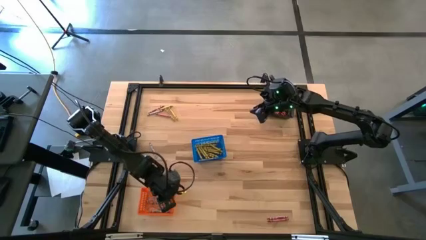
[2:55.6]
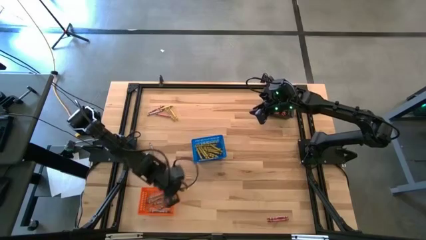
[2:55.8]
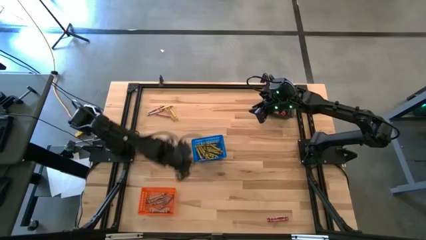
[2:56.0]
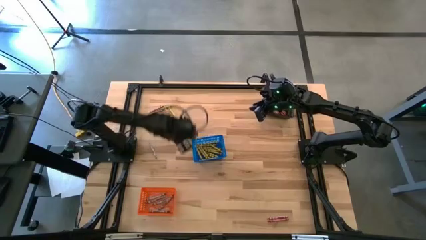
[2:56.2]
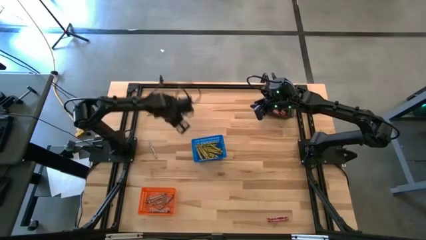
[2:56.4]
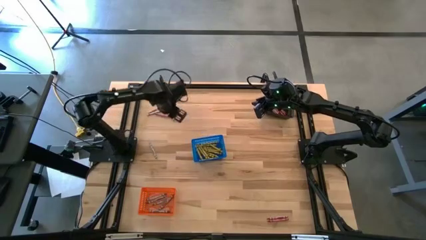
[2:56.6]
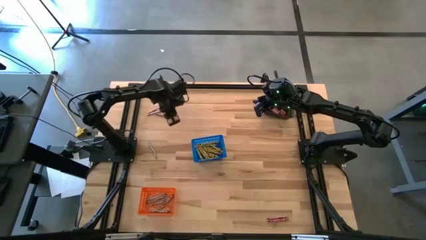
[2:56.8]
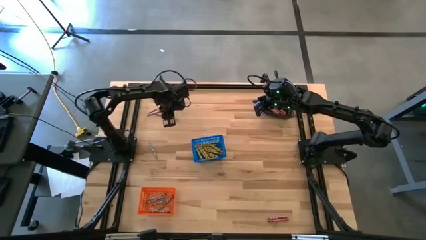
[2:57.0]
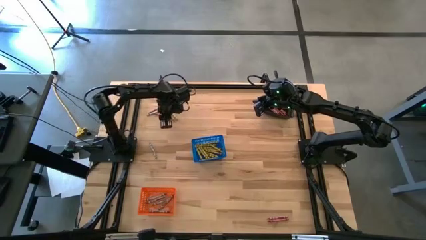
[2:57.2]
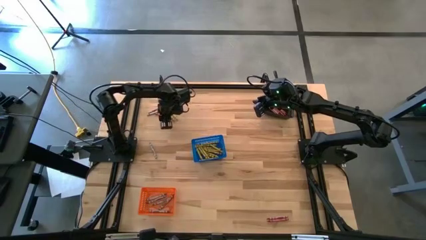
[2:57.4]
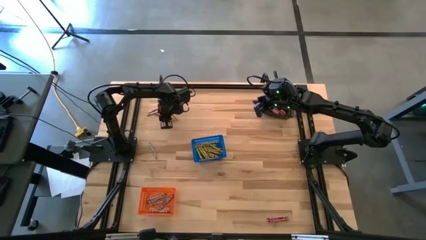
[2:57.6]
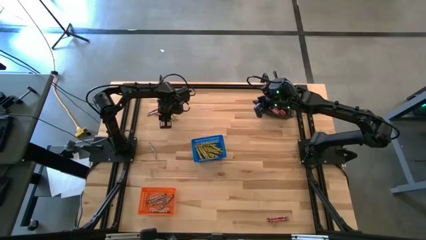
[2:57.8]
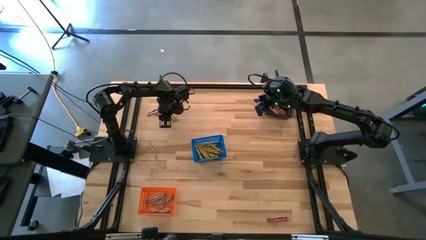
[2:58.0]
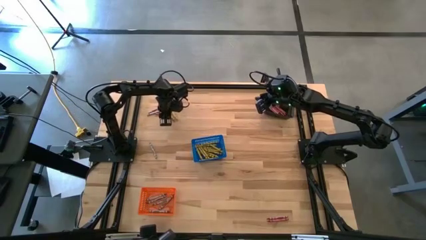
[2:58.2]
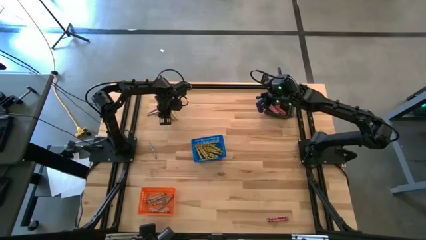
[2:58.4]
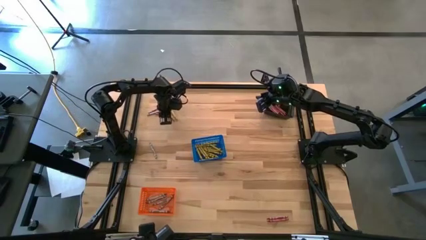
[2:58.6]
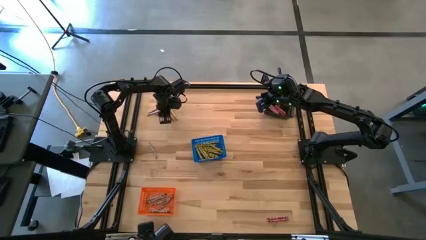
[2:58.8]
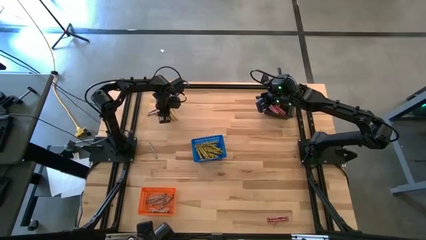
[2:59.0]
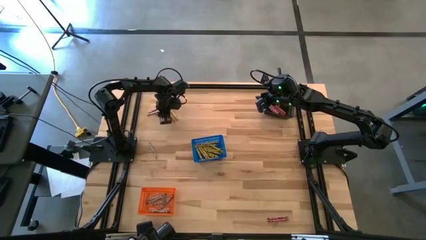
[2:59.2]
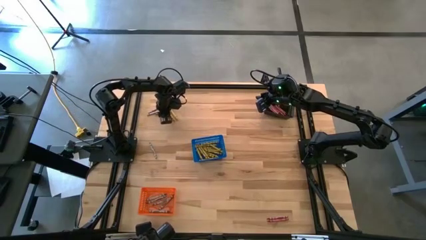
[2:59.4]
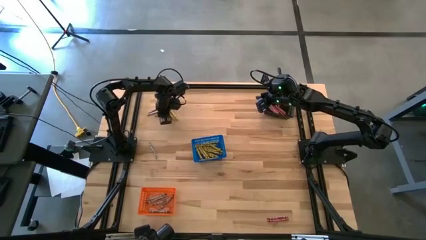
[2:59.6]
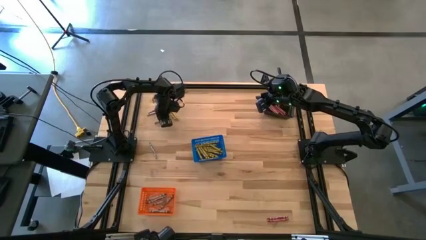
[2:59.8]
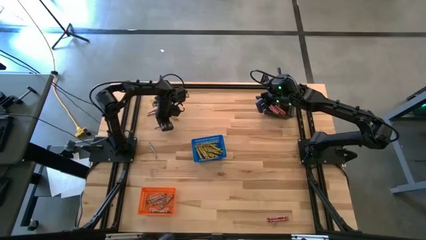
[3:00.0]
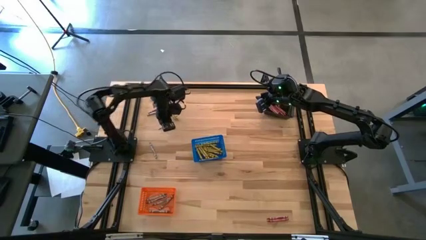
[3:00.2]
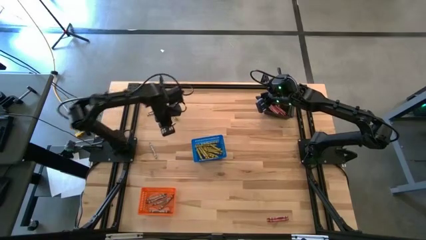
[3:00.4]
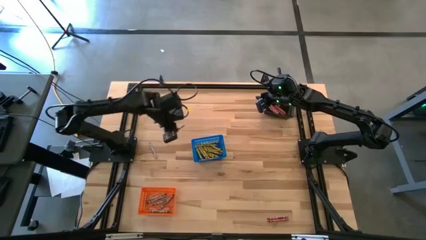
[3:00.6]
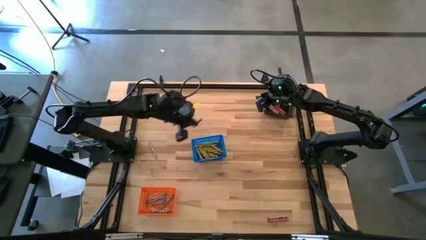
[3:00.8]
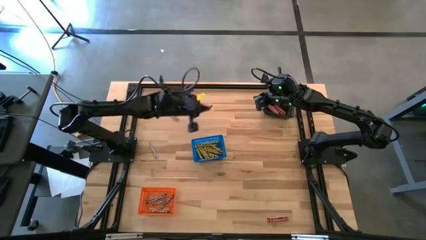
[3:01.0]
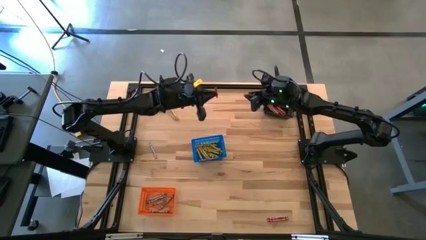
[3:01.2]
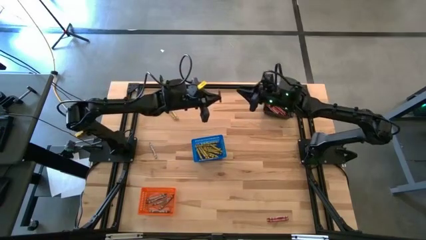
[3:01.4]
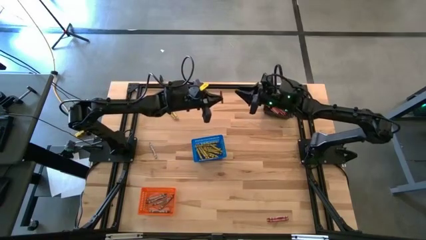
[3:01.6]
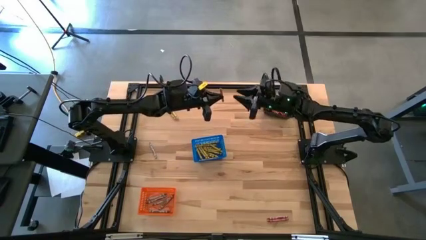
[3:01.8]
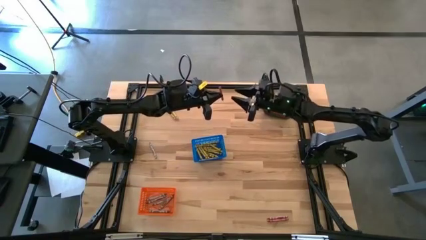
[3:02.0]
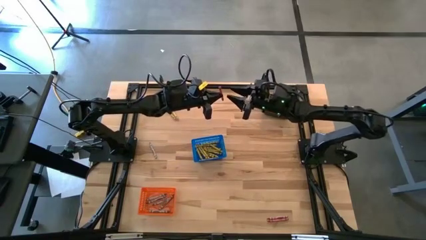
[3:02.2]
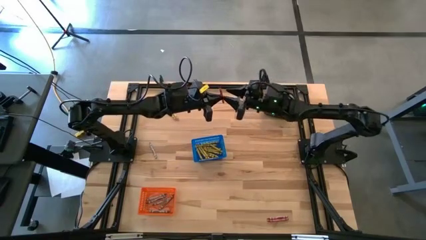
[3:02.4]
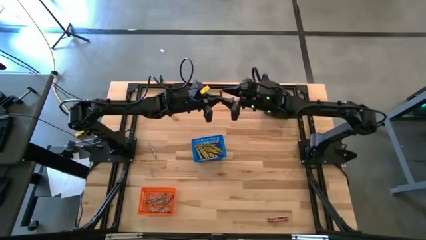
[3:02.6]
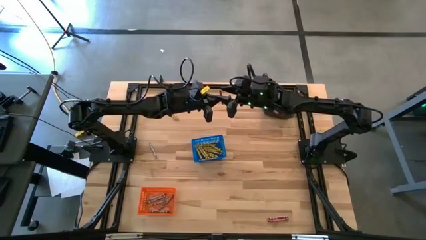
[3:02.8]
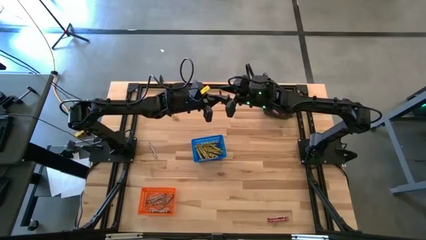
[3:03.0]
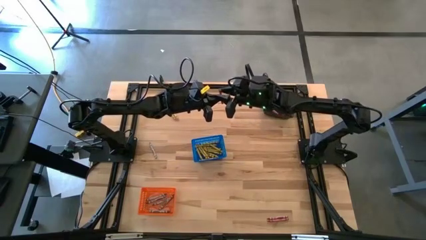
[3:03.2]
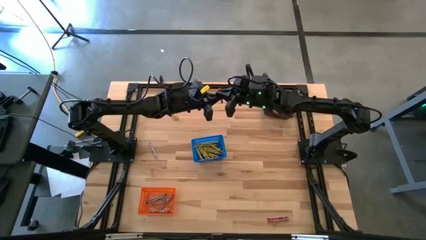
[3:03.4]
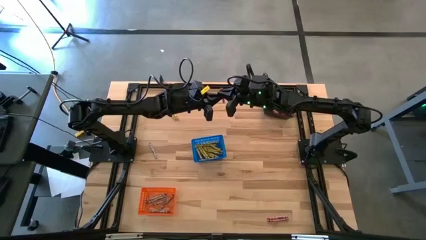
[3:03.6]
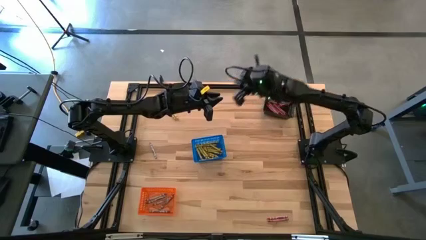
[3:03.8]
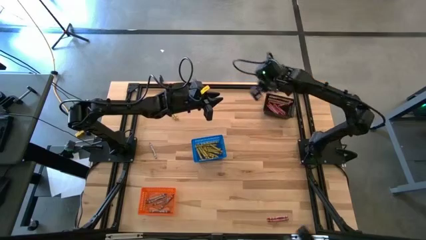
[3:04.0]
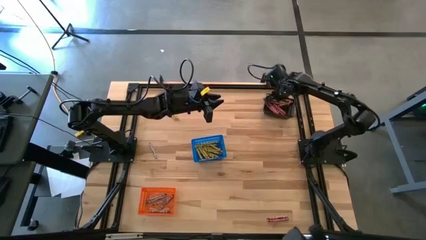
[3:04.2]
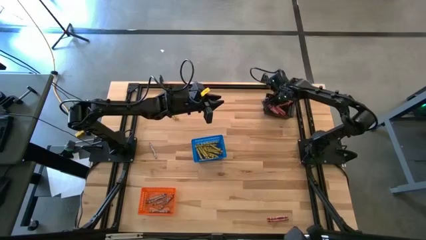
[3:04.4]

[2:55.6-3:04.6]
Task: Sort crayons
Put the red crayon into the black basket

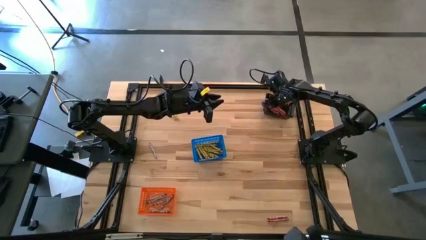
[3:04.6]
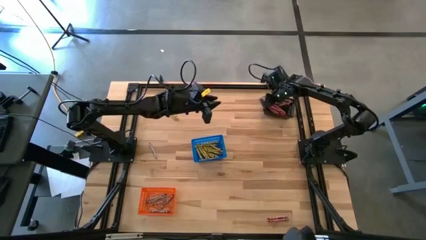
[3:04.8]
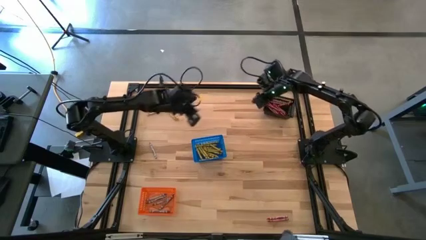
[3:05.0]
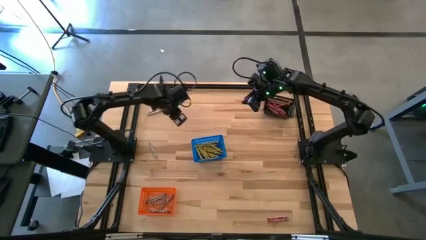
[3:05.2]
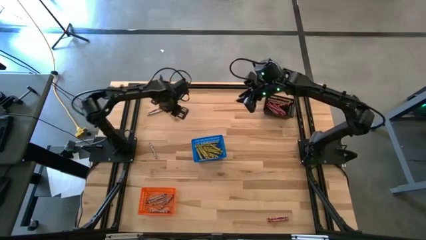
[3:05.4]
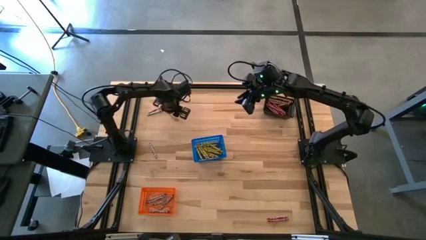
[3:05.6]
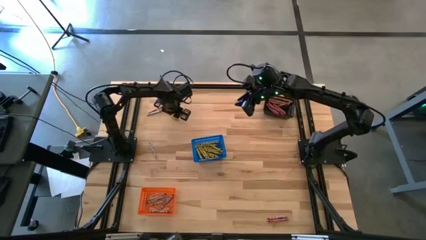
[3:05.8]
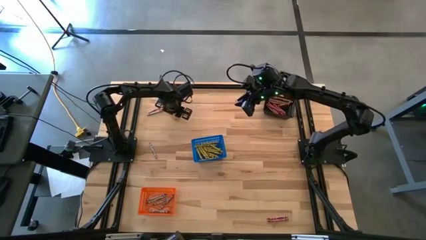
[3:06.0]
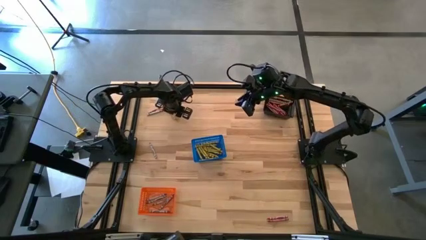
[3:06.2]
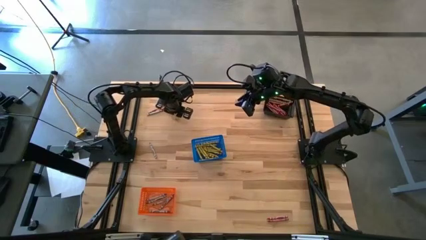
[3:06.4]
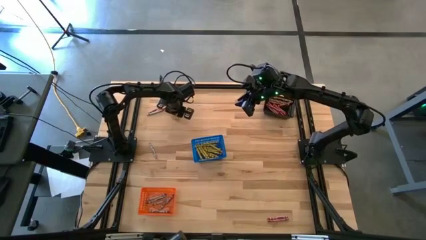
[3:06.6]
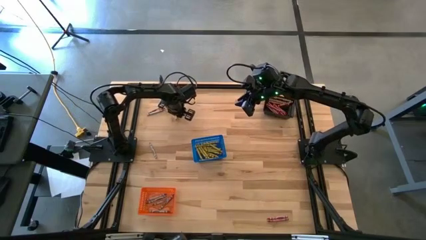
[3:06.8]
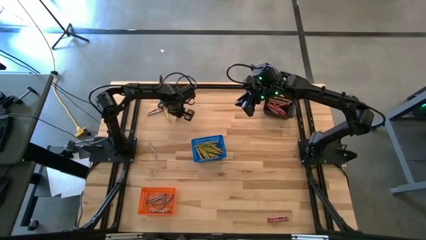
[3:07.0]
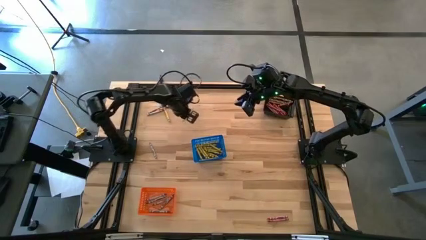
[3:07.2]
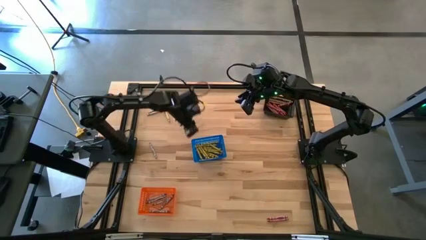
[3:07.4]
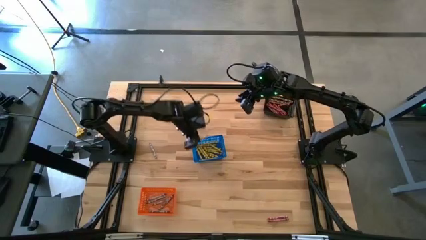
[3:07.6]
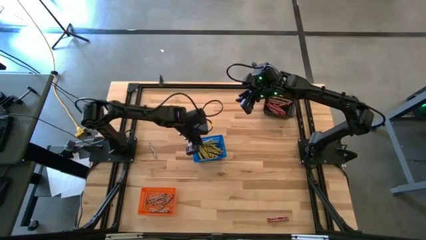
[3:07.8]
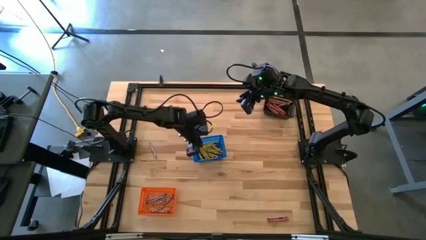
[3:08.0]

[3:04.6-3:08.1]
Put the yellow crayon into the blue basket

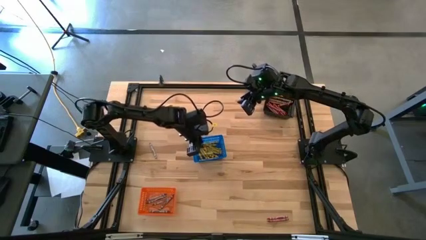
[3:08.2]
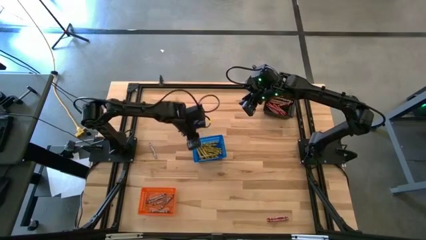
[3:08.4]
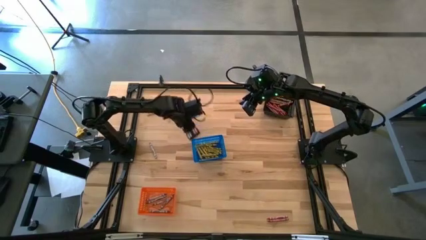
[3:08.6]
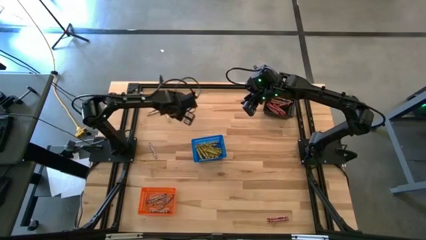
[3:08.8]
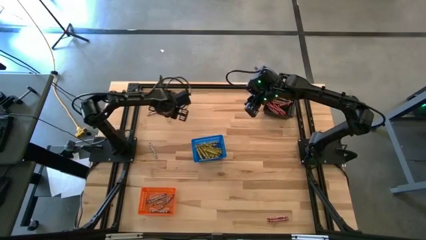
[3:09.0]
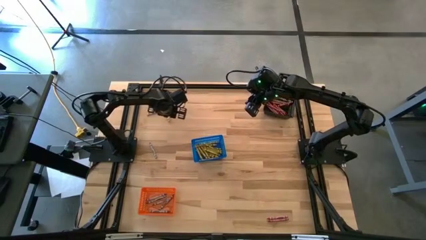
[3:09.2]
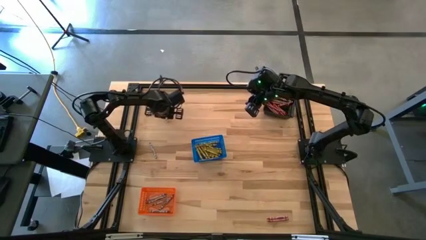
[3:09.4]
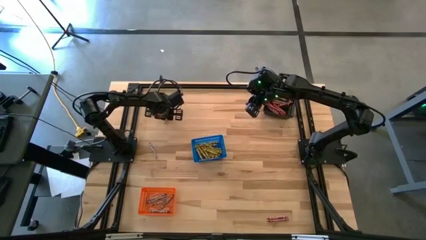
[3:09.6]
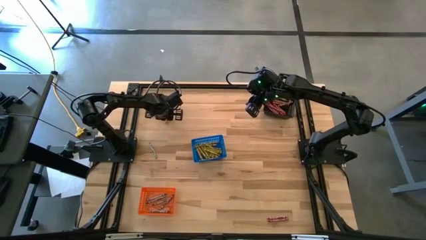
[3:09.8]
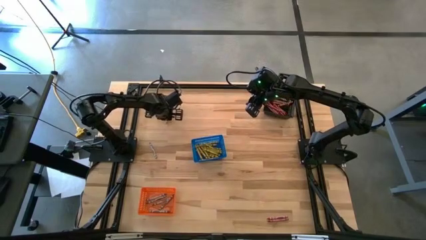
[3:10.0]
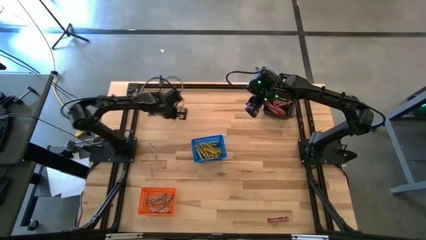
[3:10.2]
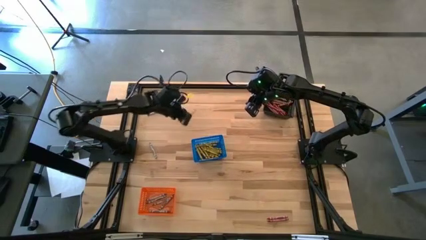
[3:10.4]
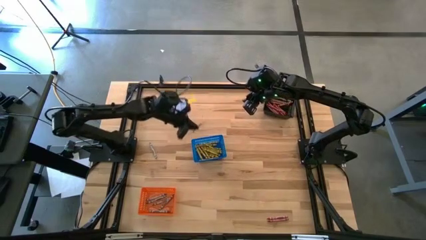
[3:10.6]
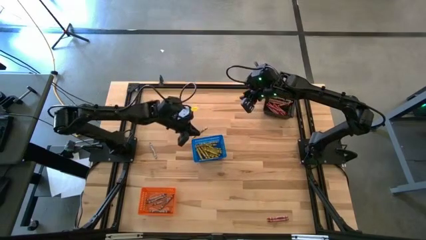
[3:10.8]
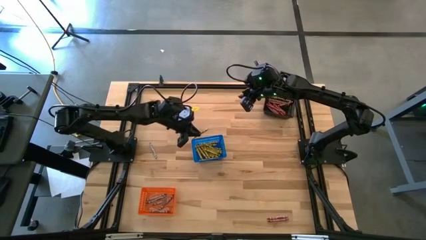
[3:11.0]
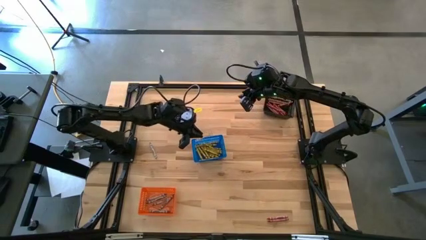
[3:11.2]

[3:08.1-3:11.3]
Put the yellow crayon into the blue basket
